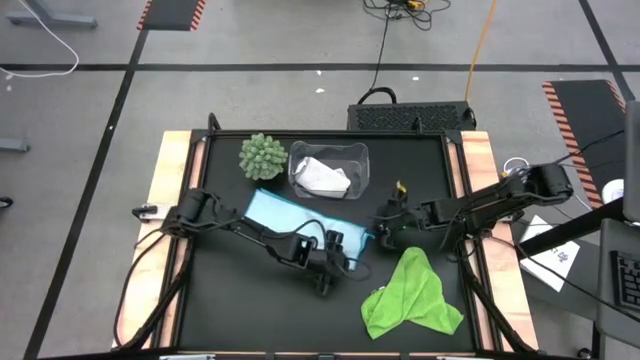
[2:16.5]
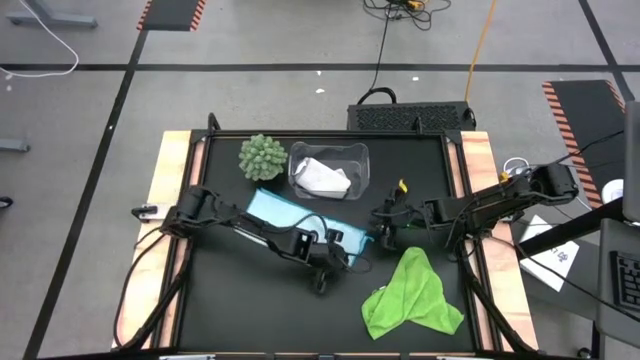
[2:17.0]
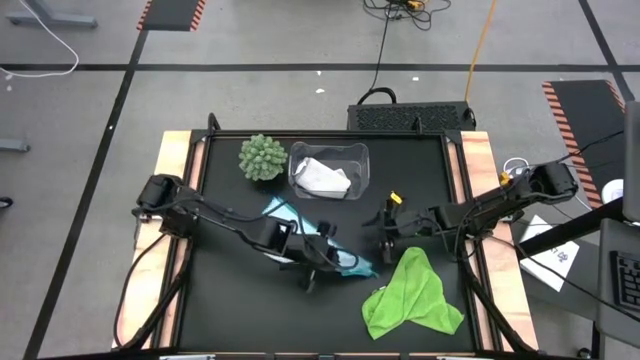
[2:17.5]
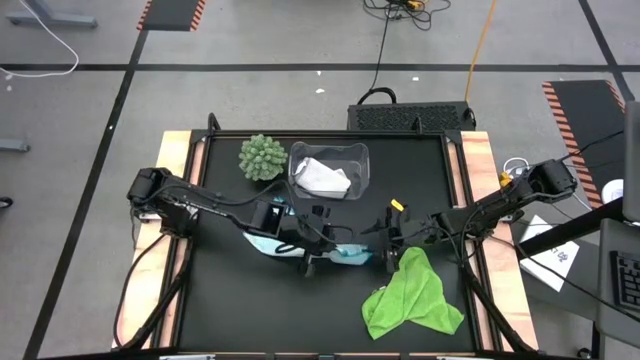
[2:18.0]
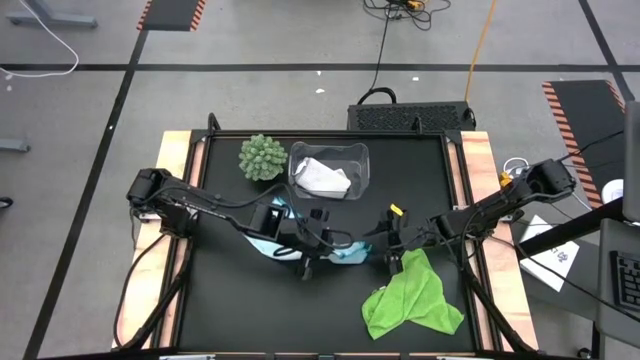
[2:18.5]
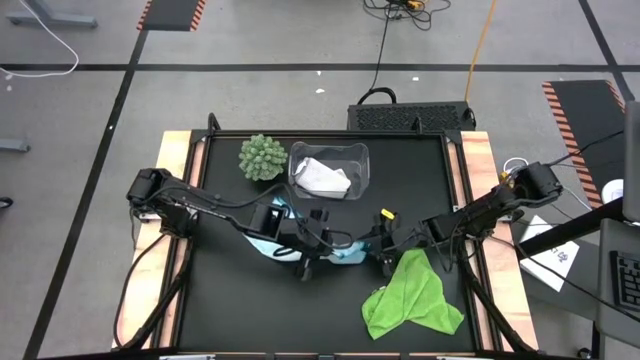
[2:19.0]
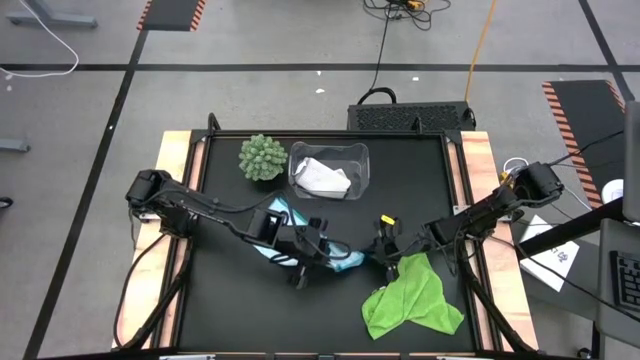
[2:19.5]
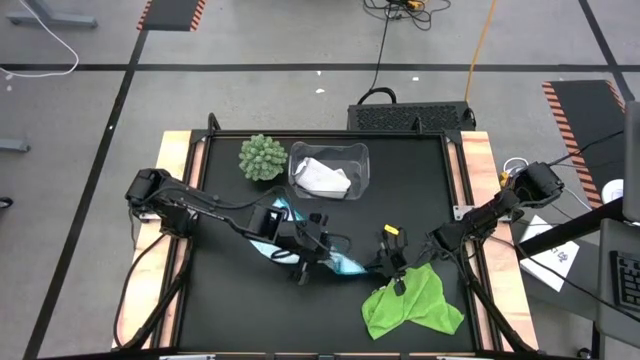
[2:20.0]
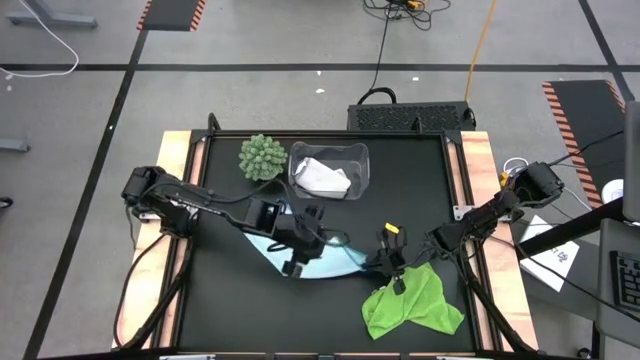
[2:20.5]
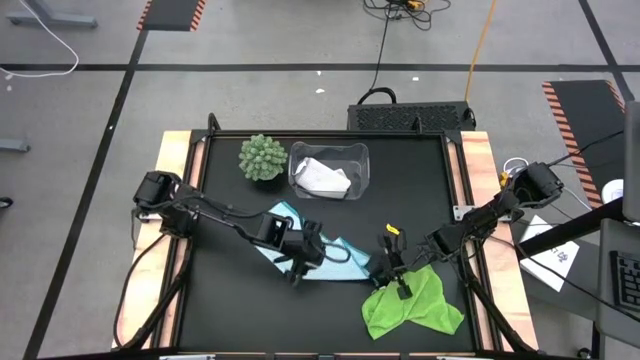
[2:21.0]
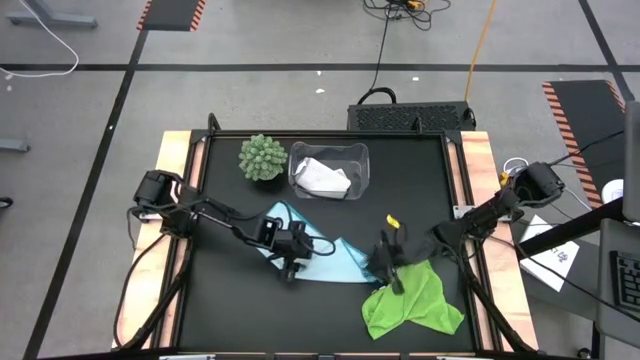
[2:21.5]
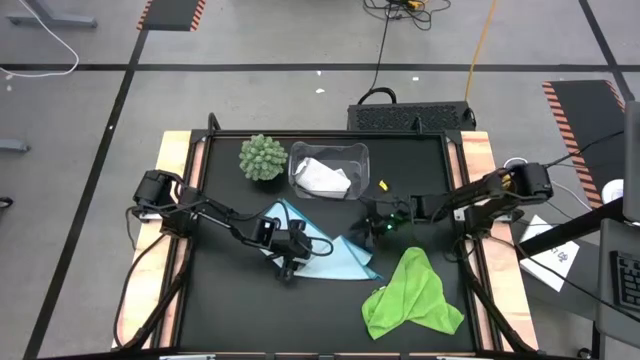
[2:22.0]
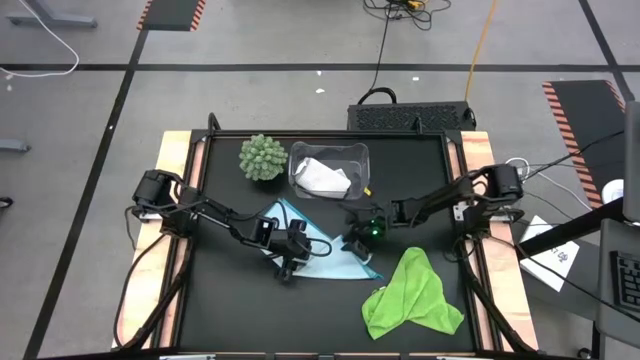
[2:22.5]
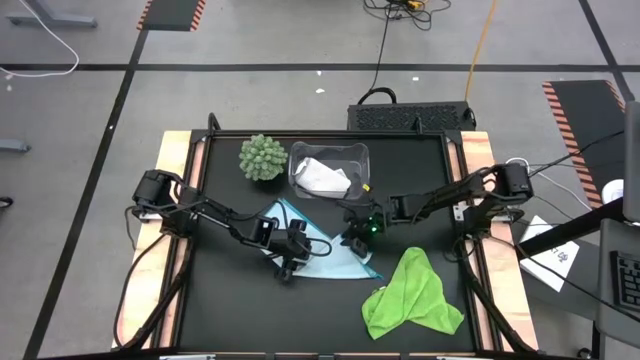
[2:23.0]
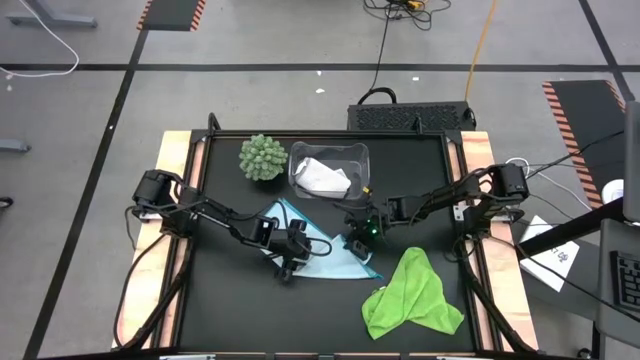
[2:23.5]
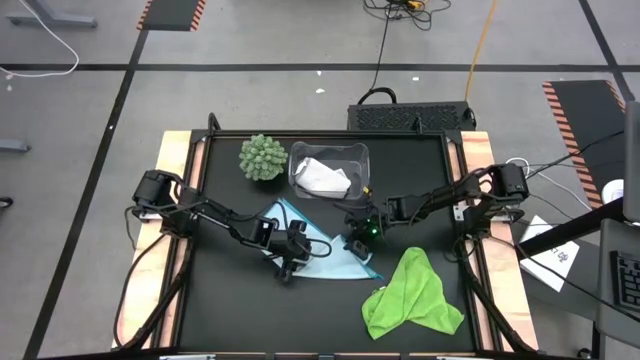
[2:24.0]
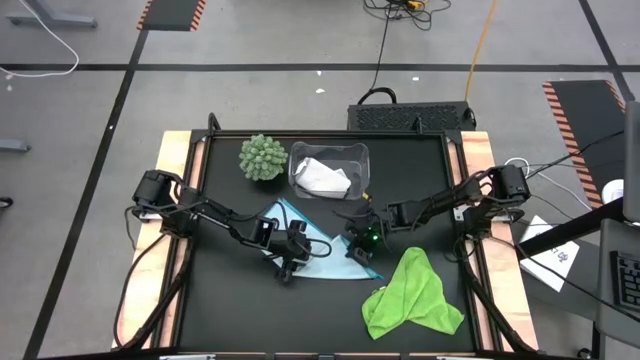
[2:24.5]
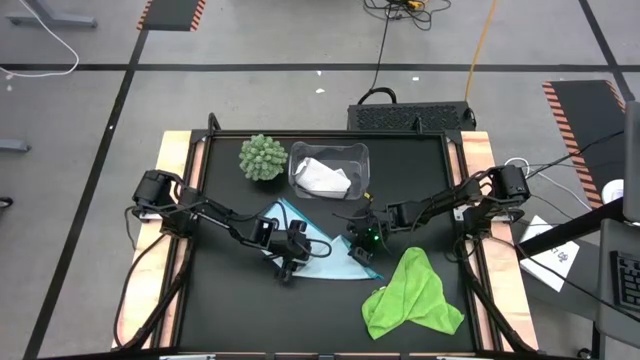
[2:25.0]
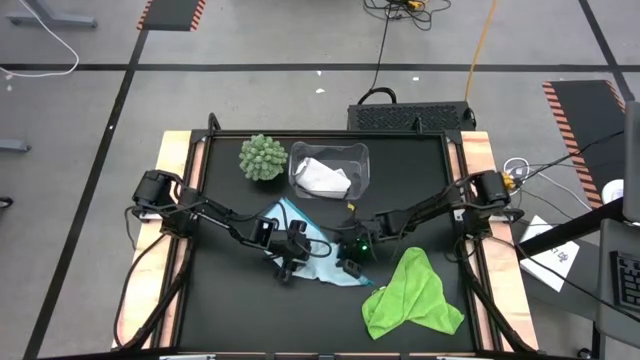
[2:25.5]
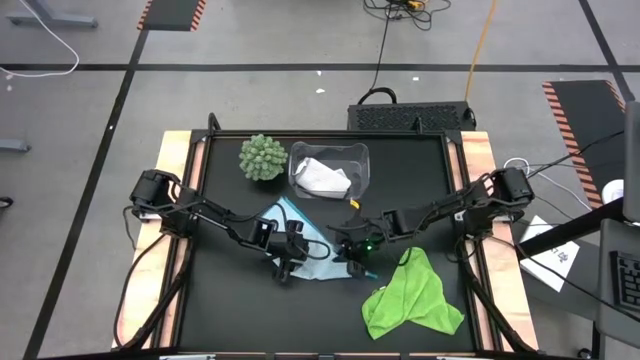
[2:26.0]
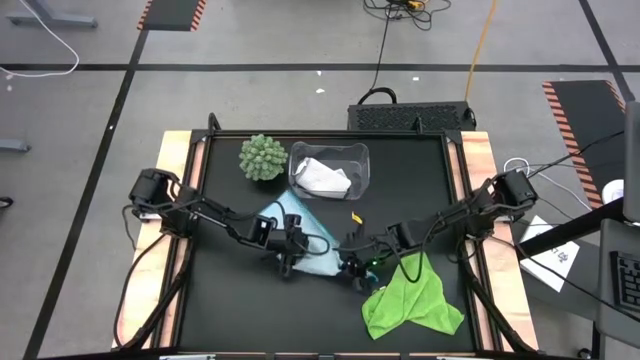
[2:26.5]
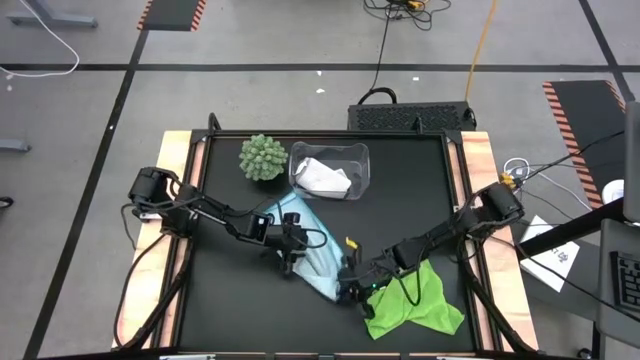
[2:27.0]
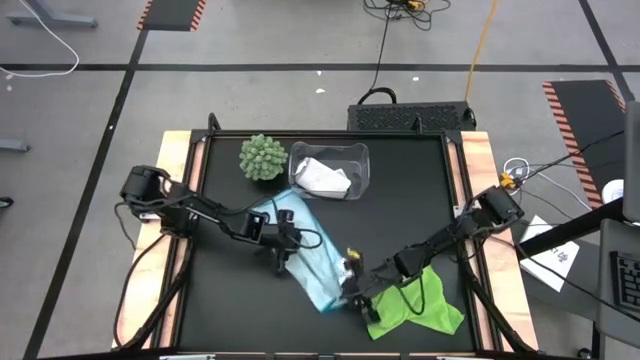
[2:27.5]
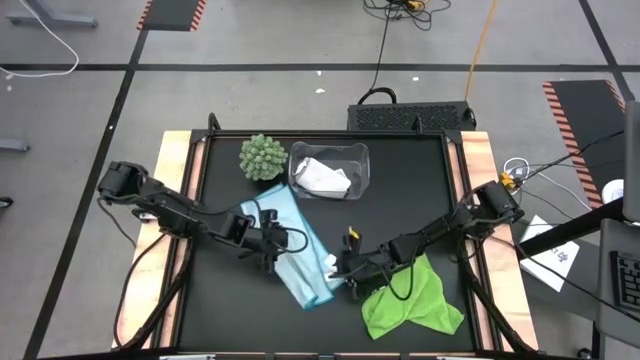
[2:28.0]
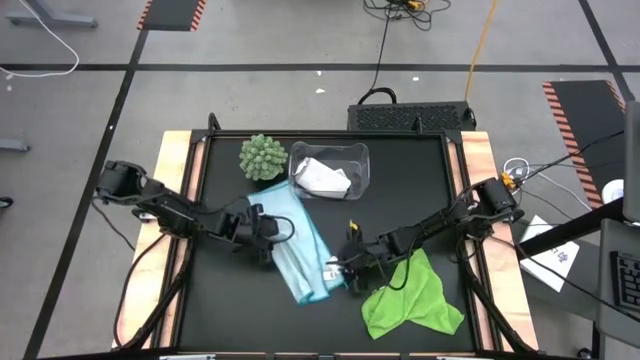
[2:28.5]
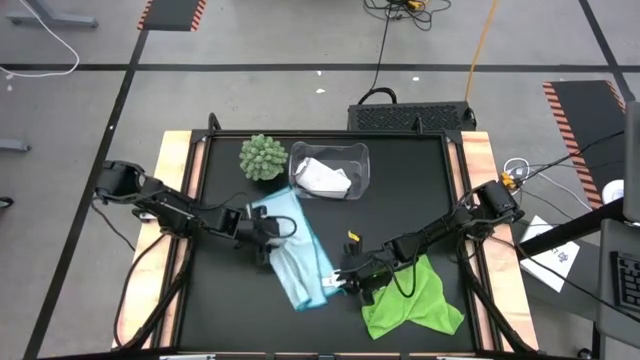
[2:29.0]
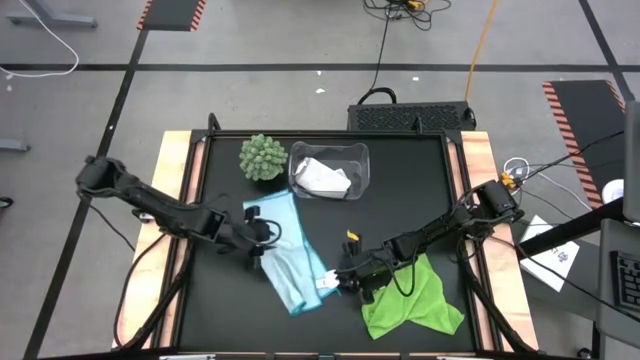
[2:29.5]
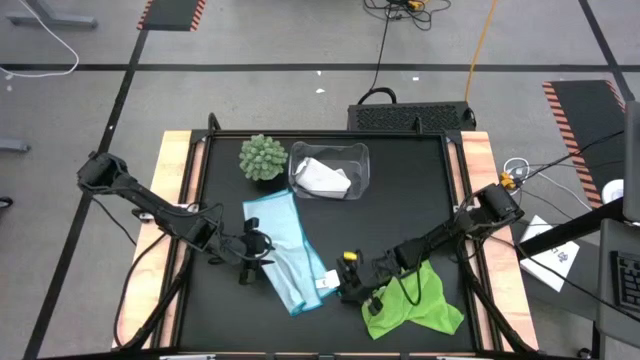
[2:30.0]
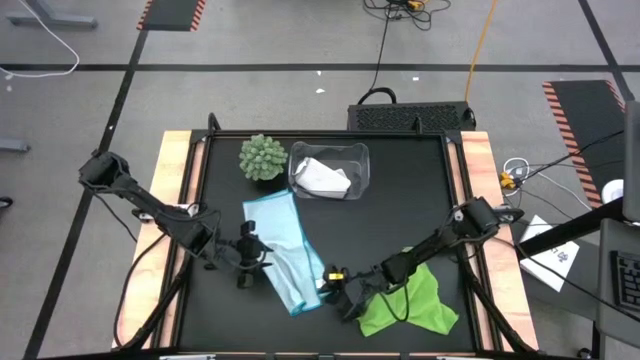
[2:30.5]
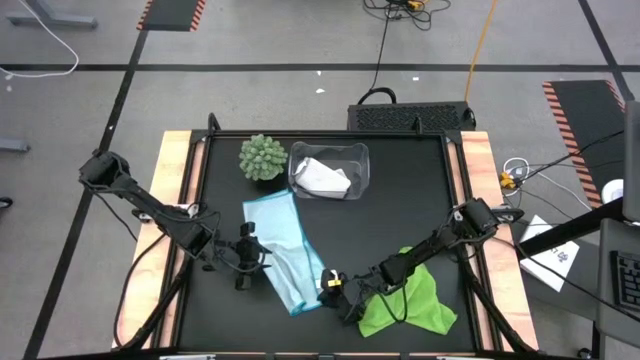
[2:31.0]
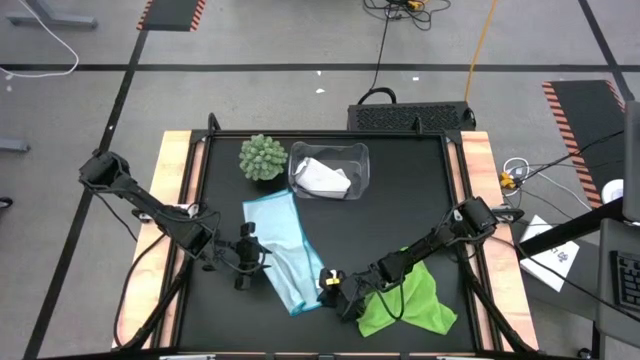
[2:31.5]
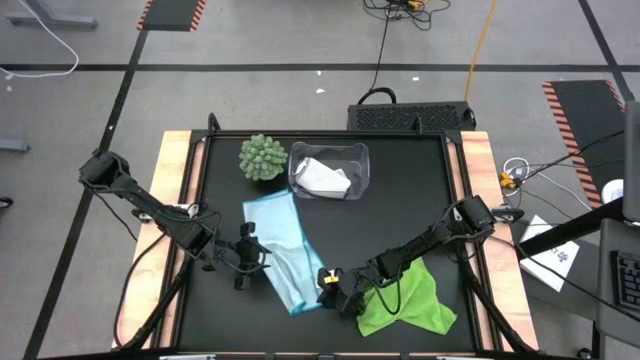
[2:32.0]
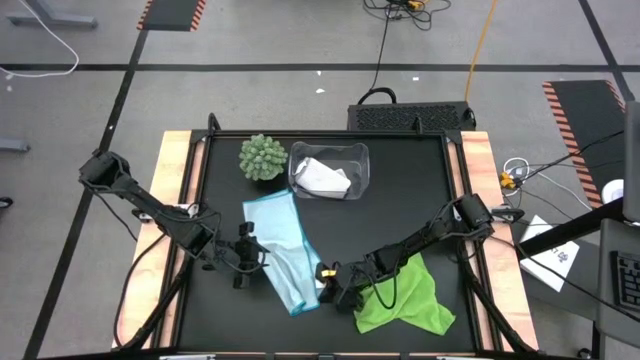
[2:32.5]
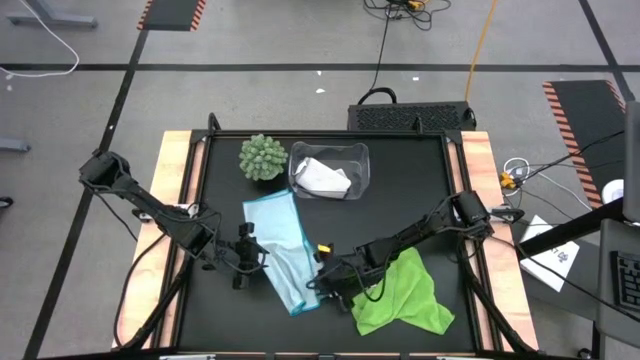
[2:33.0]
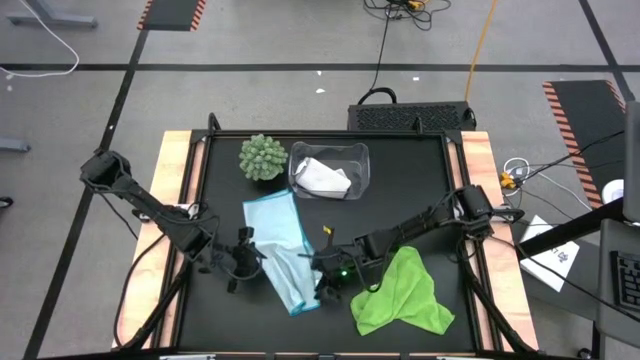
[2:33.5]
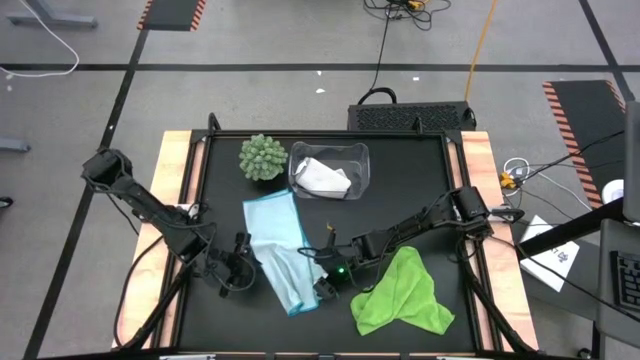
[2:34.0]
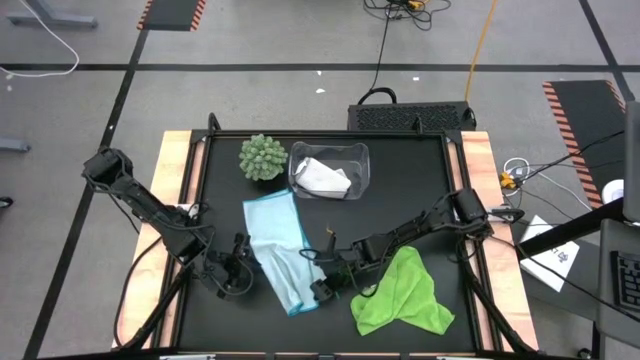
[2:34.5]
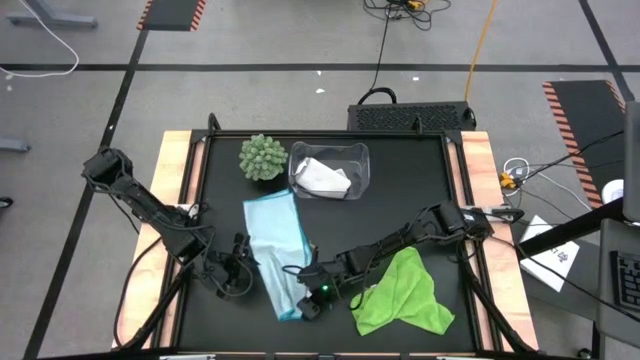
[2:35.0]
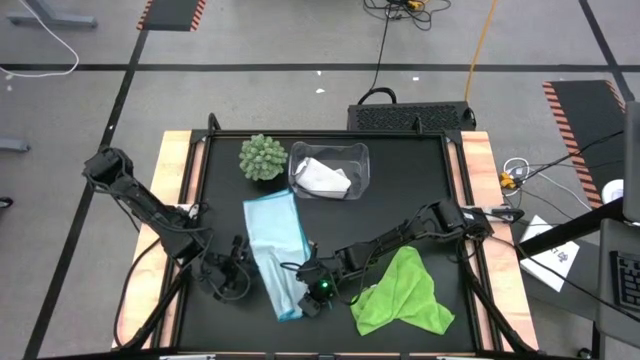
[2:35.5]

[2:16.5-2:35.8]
Task: Fold microfiber towels
Fold the blue towel

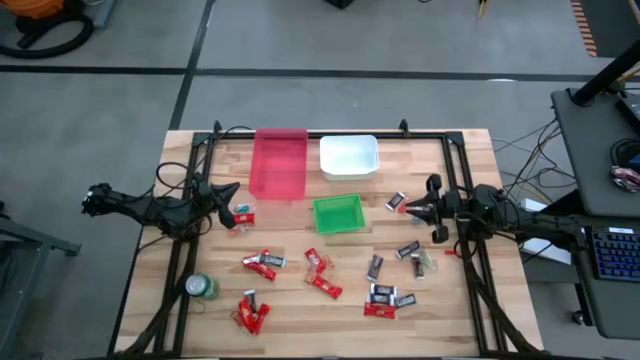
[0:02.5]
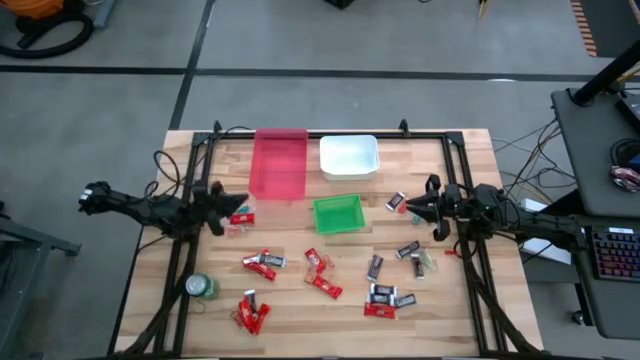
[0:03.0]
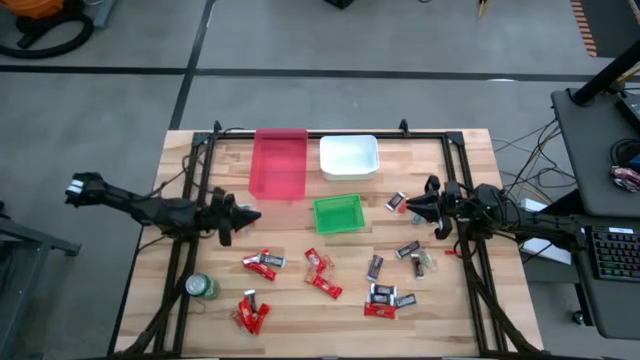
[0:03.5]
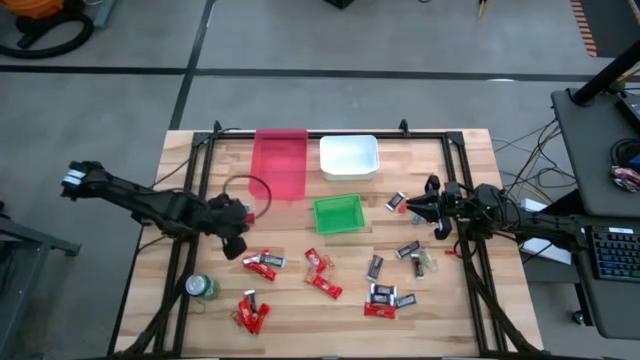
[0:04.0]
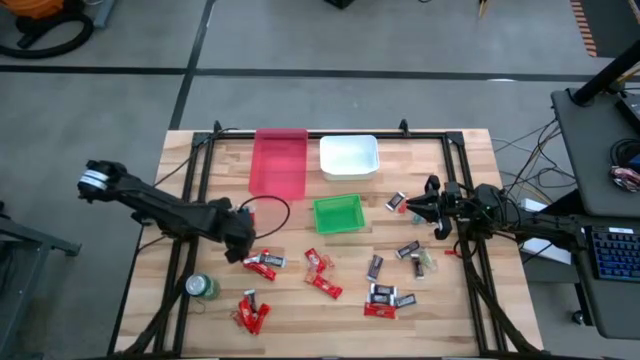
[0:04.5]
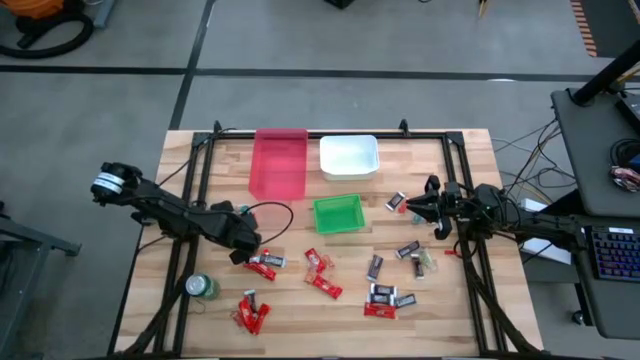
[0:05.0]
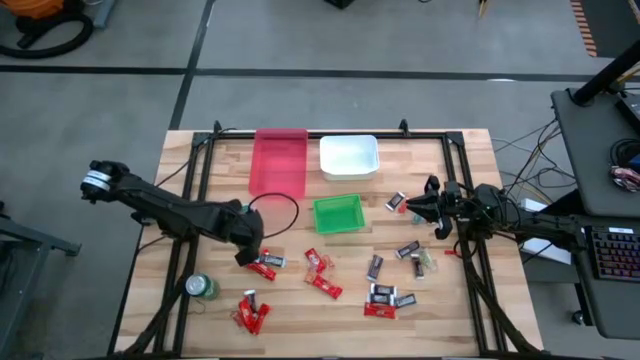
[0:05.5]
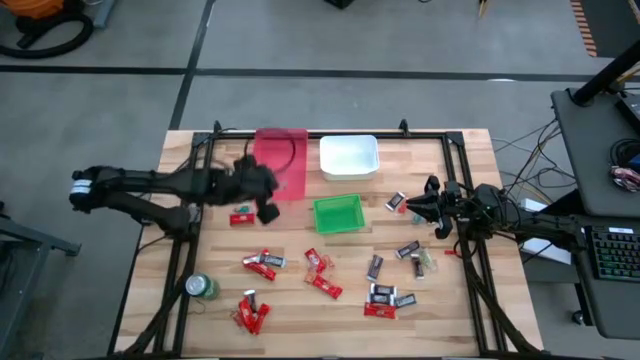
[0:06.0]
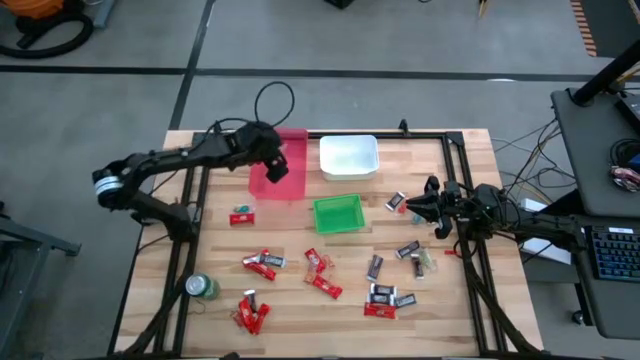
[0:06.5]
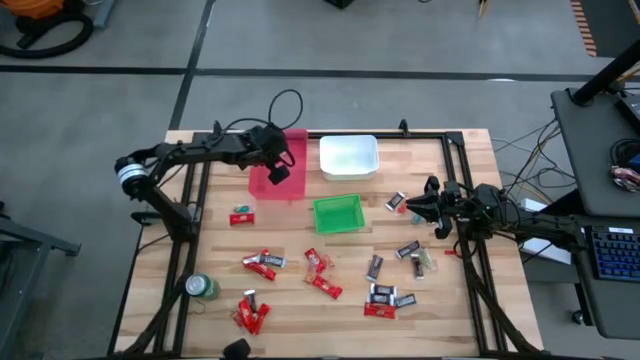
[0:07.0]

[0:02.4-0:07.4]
Task: Sort candy
Put the orange candy into the red bin
